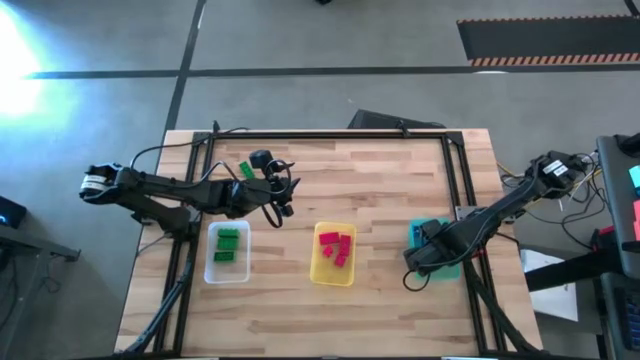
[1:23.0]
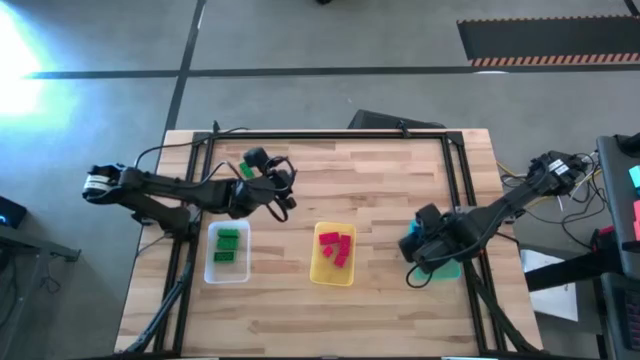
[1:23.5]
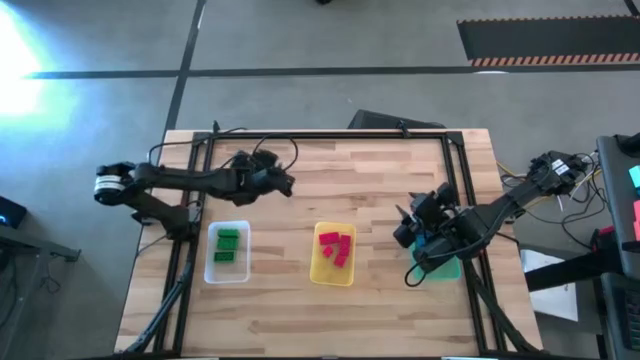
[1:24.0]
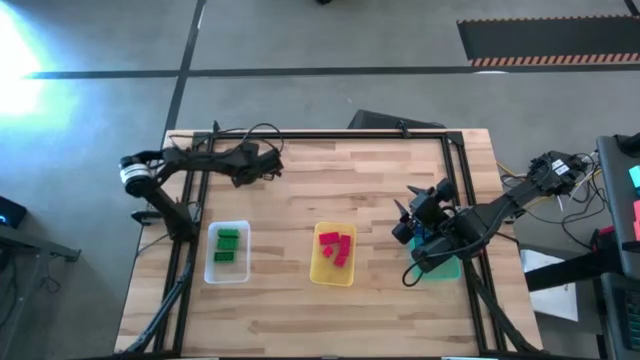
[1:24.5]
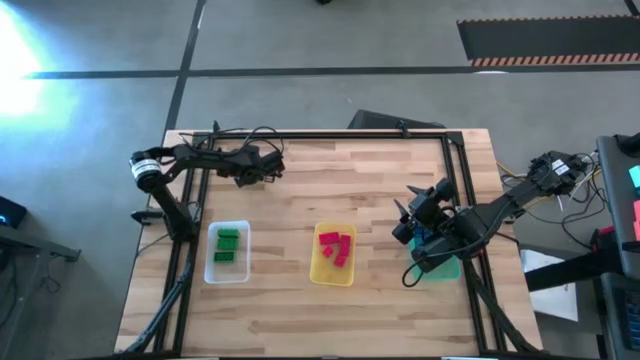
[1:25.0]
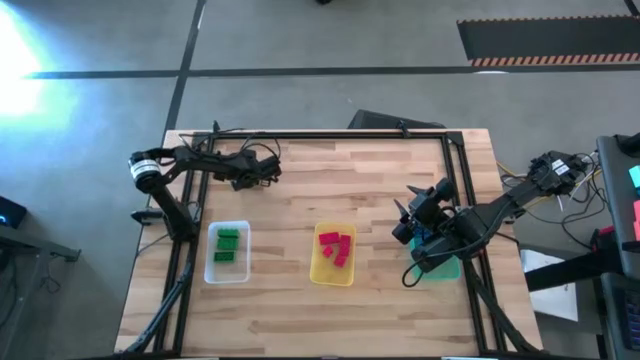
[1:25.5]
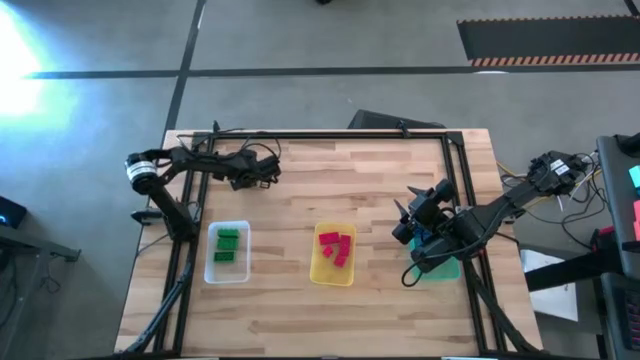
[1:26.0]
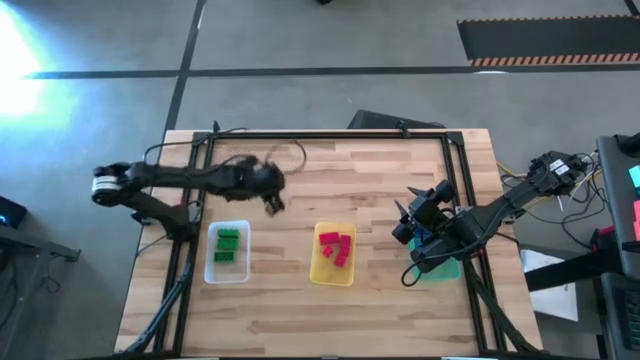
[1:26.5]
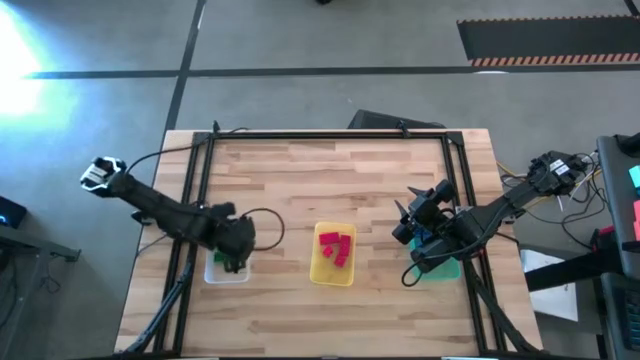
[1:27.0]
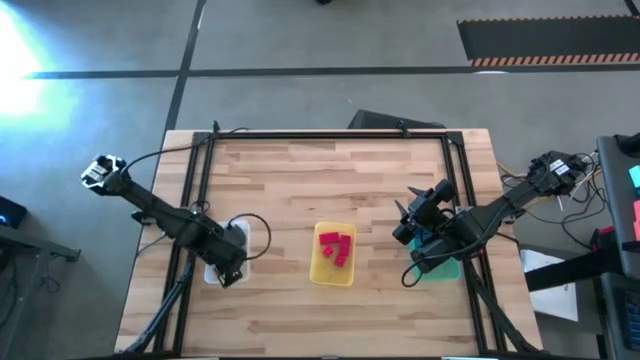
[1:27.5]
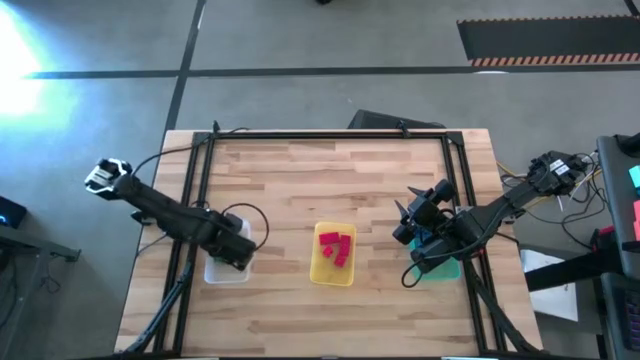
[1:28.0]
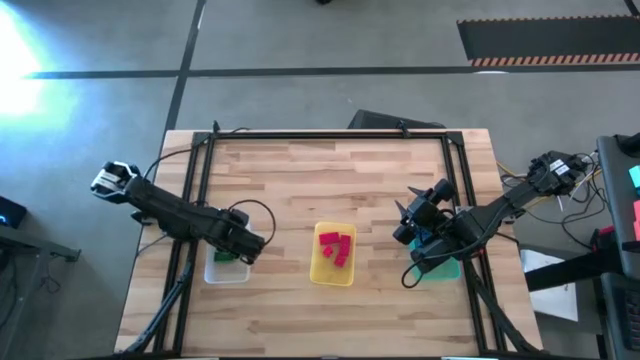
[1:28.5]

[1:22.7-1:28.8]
Task: Sort & place blocks by color
Put the green game piece into the transparent bin

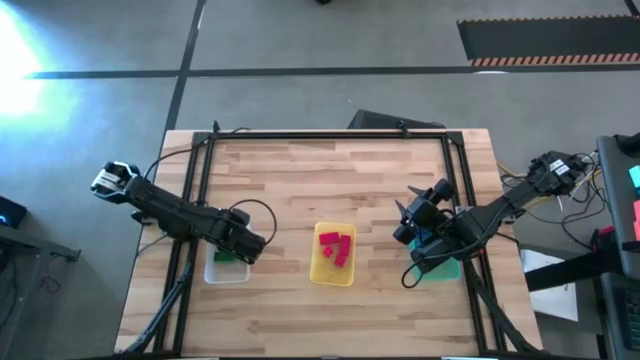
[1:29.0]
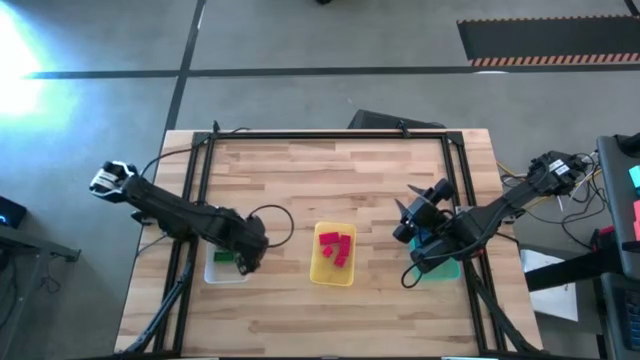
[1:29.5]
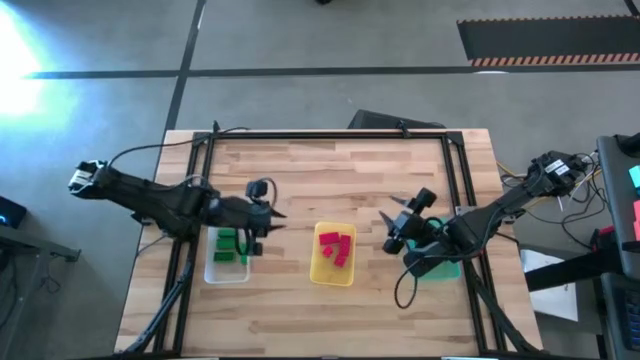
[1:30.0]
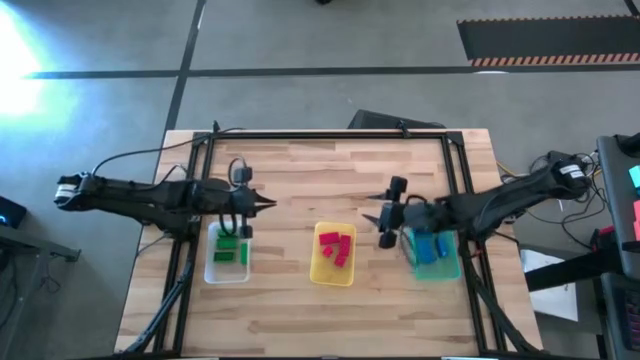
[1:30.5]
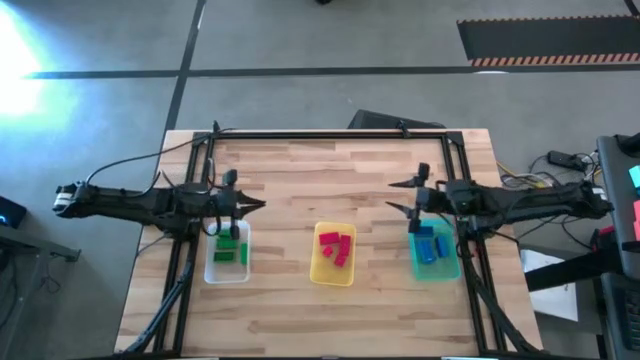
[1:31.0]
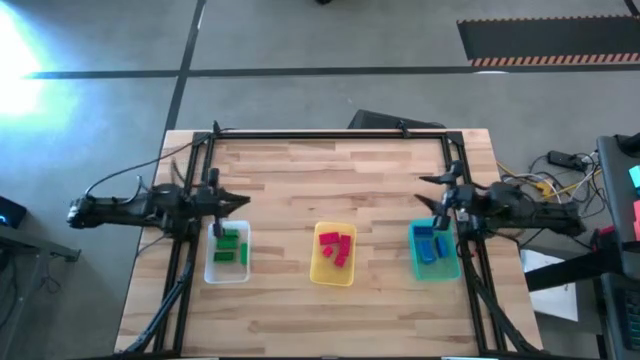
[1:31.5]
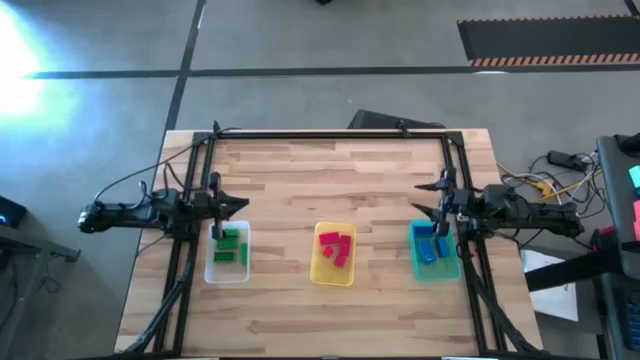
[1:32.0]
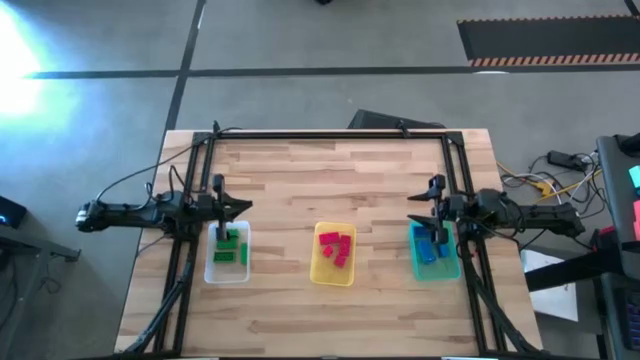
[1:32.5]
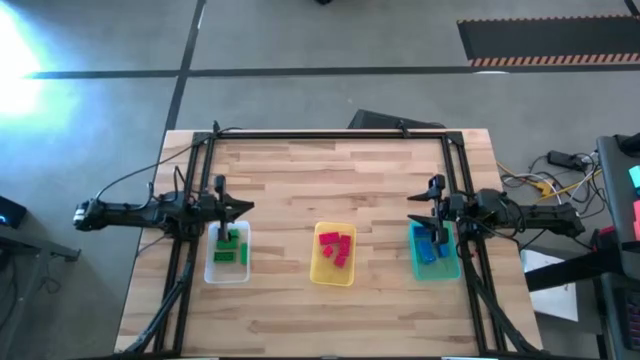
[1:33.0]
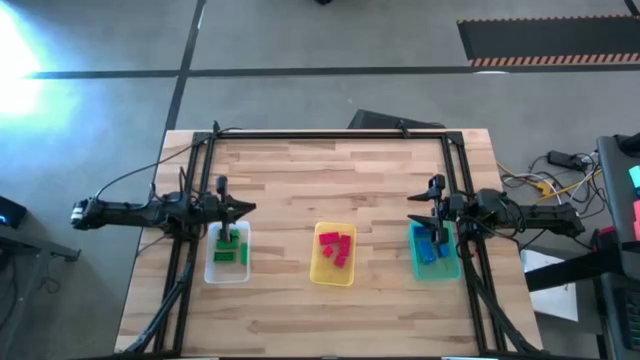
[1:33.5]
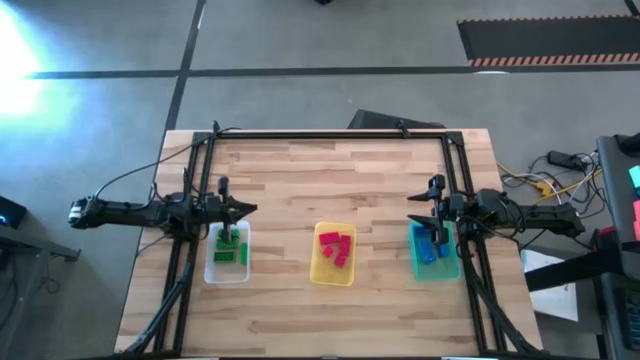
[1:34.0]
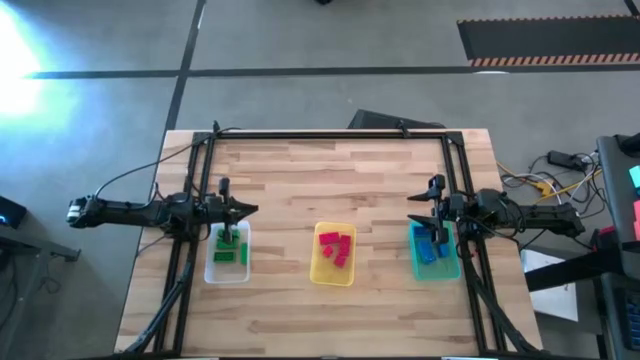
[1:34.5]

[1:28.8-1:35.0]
Return to Home Position

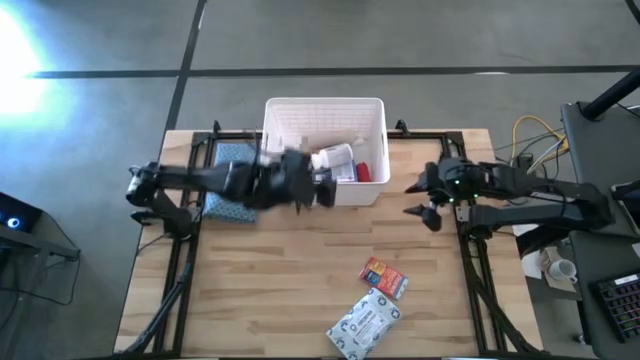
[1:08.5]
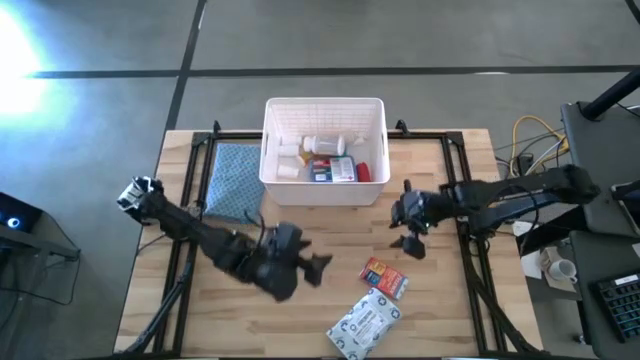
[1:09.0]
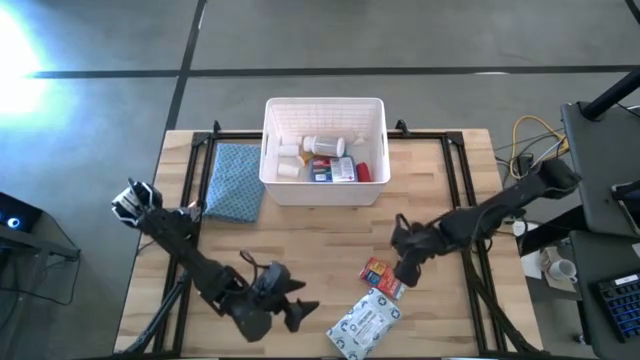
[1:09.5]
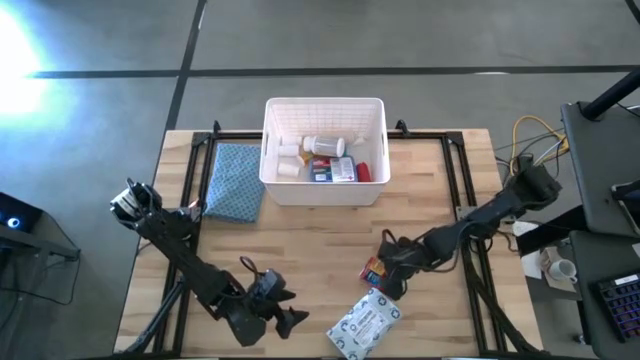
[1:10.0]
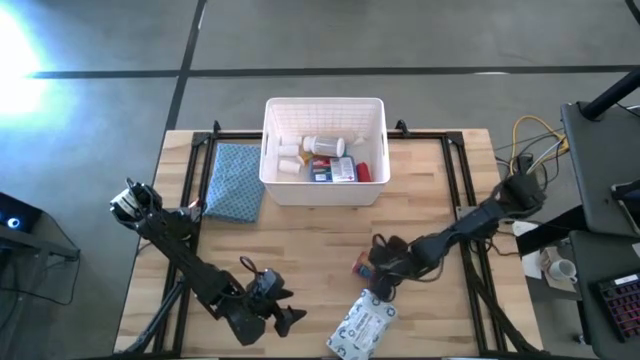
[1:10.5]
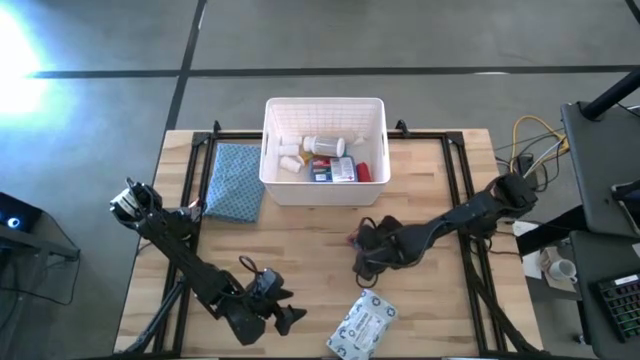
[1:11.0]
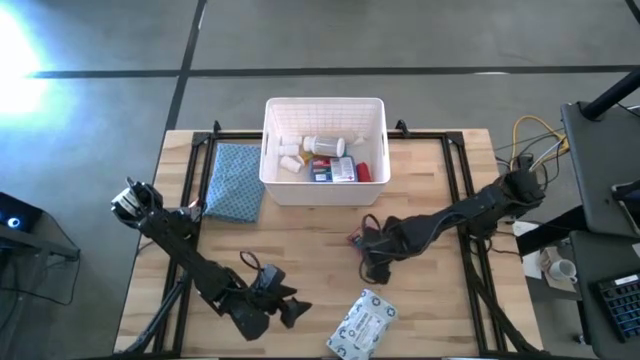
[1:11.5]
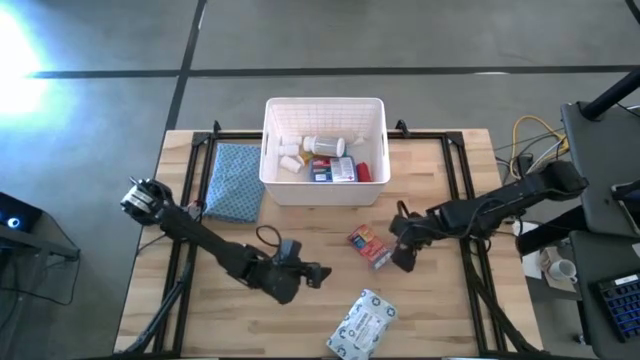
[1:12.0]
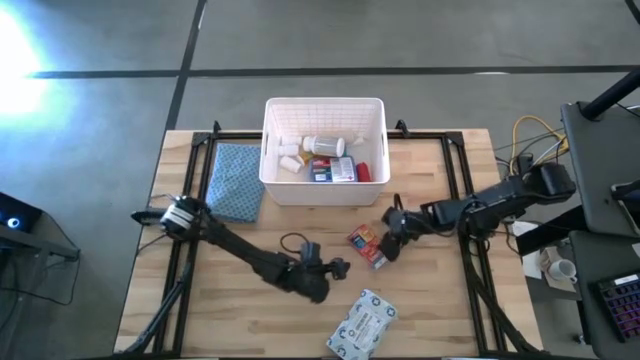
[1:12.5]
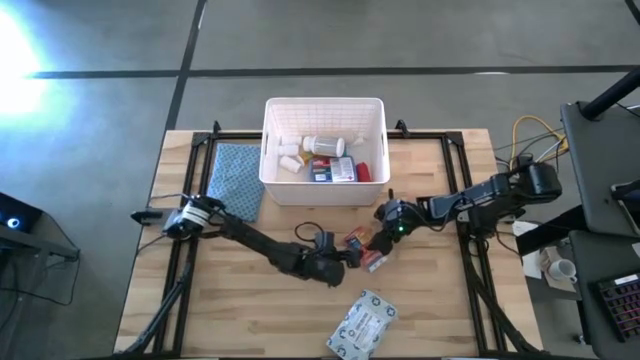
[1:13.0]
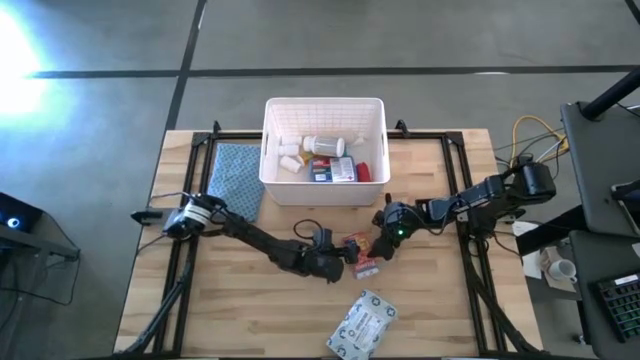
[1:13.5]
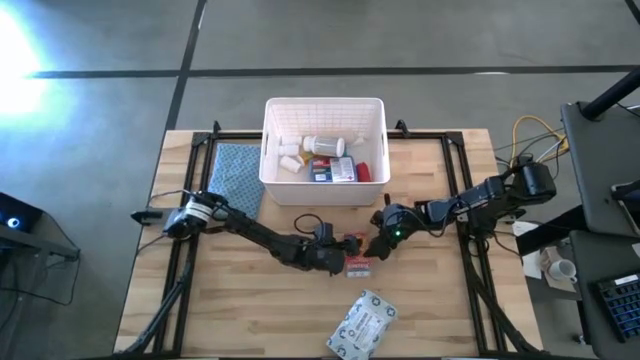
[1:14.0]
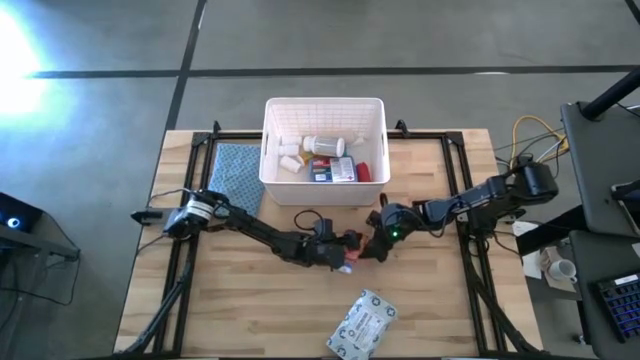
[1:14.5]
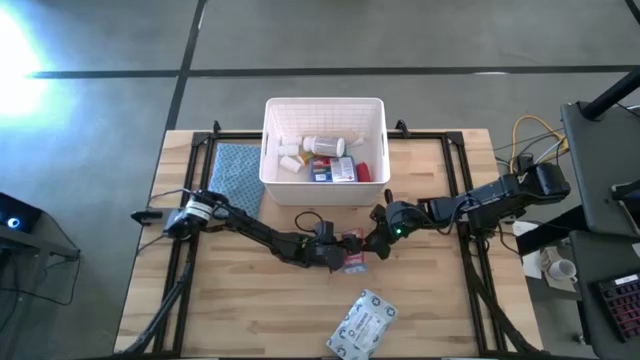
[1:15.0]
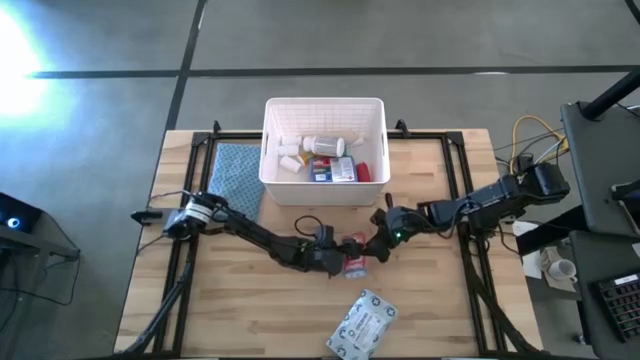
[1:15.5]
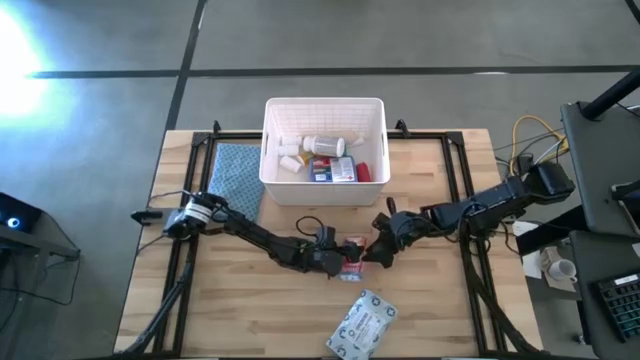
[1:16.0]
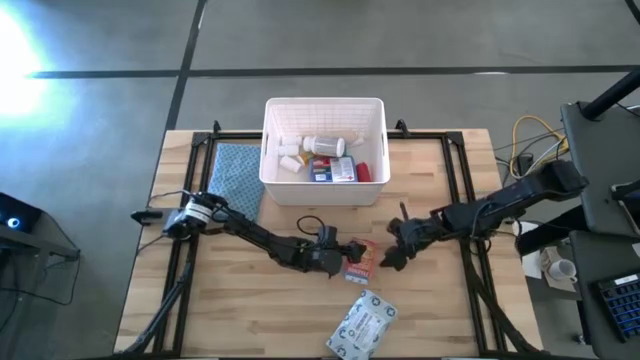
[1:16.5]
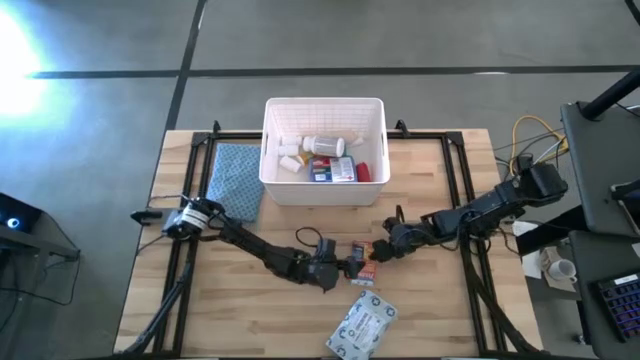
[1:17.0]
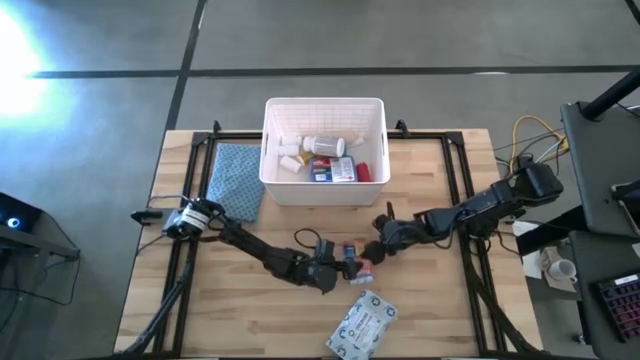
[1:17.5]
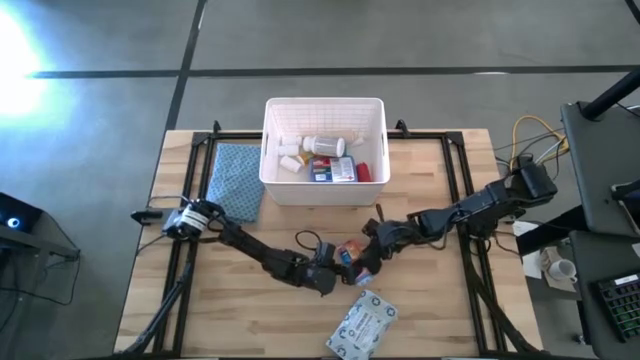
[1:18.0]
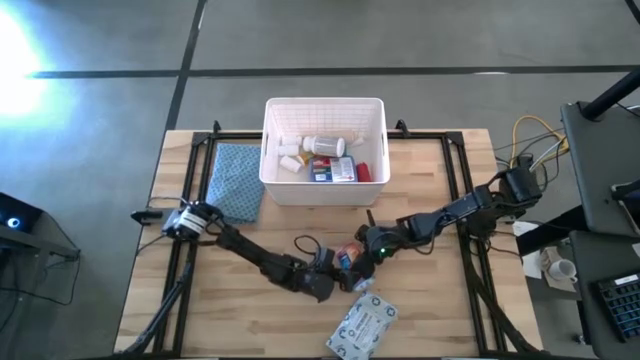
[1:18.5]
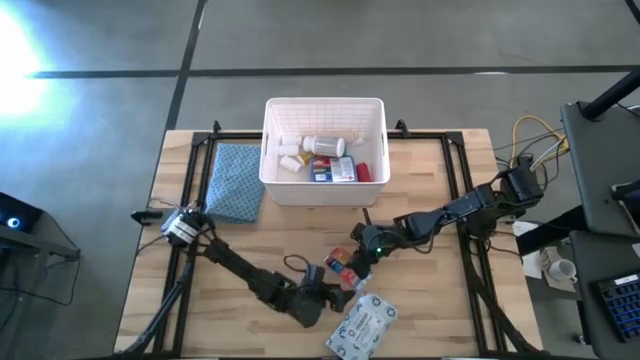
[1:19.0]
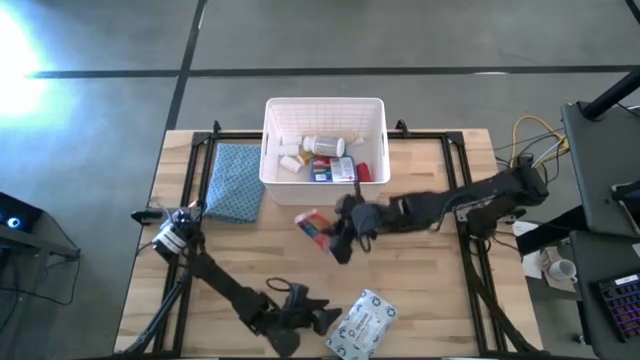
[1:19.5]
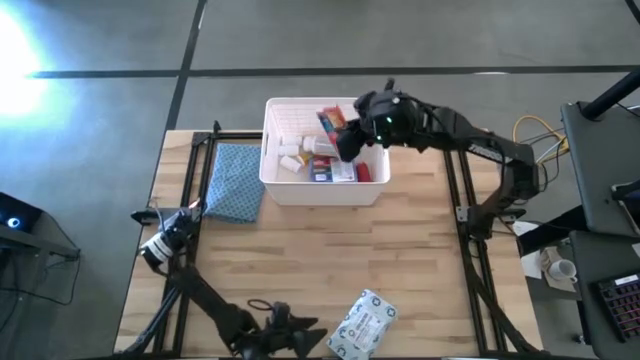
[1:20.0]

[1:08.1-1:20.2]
Task: Pick & place medical supplies in basket/bin
Put the red medicine box into the white bin
